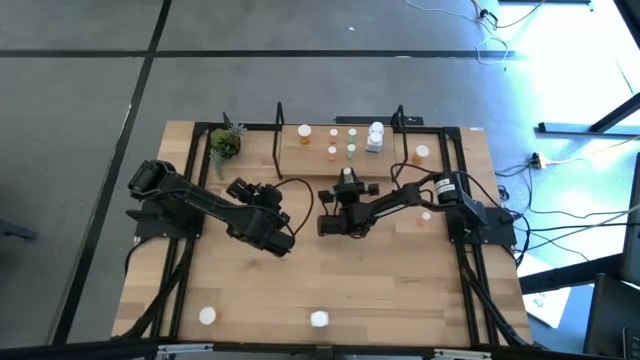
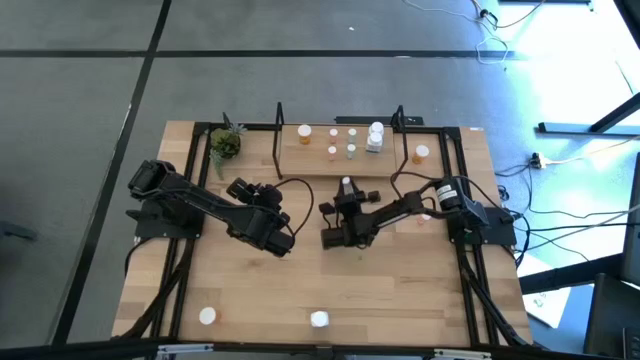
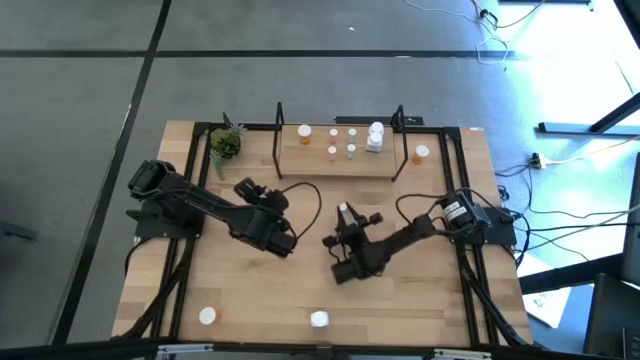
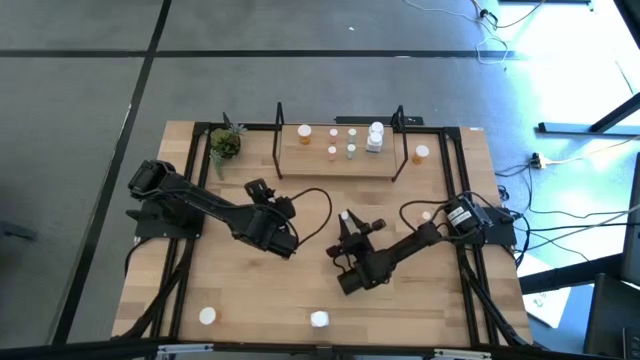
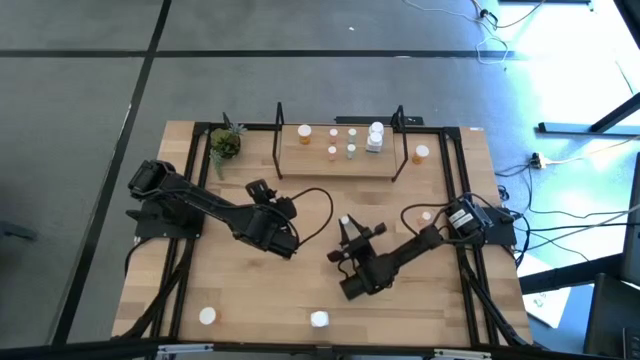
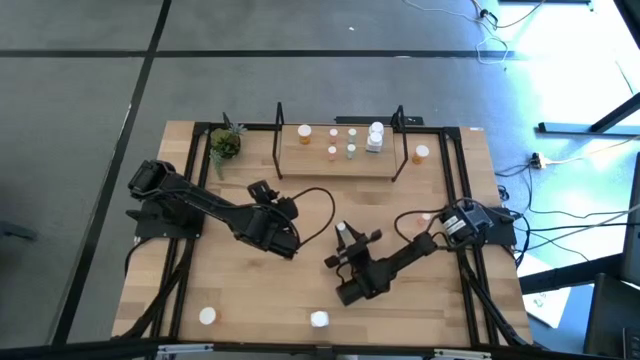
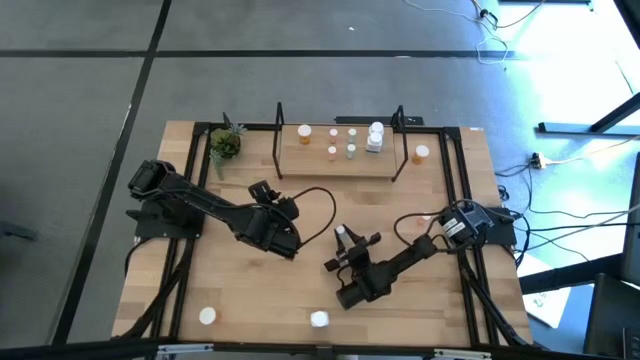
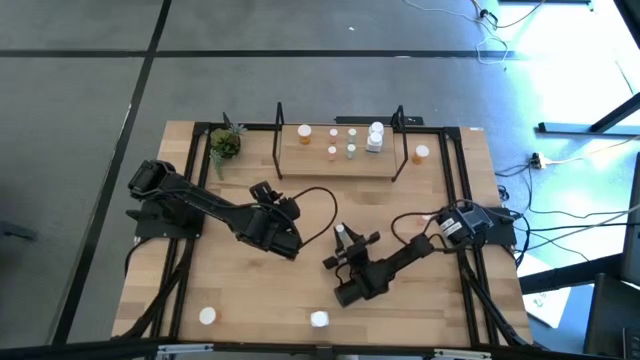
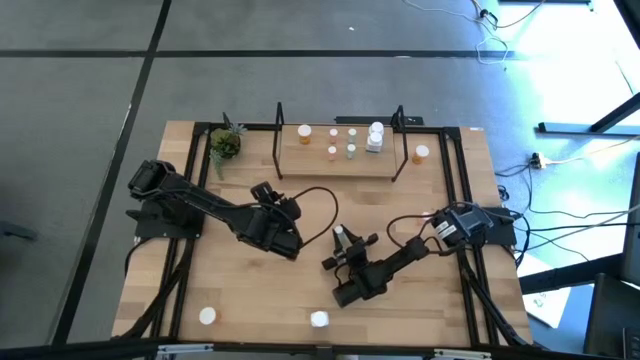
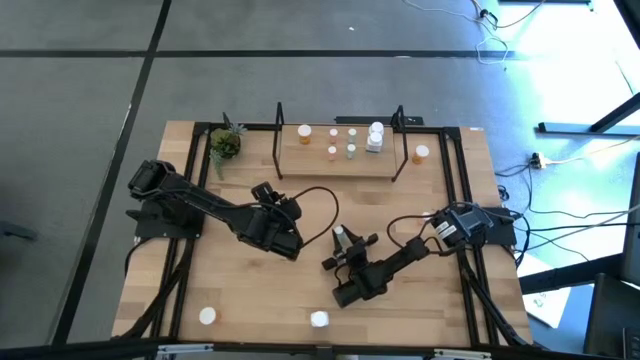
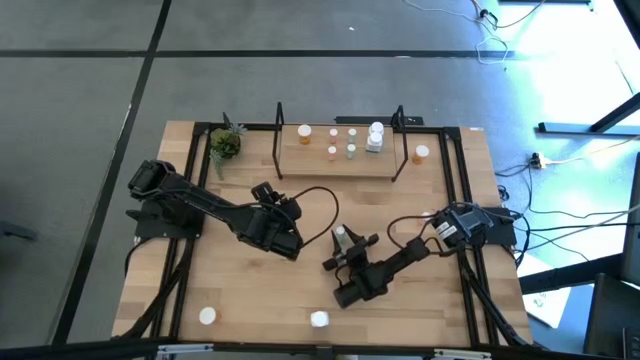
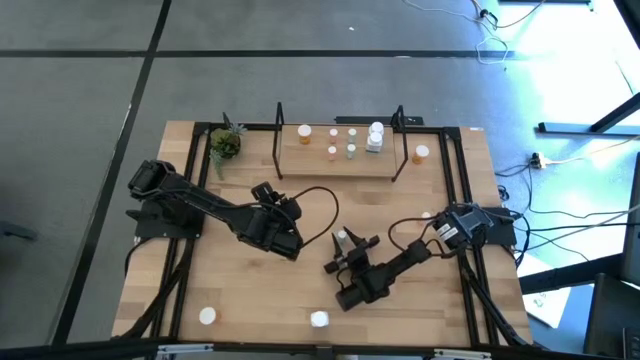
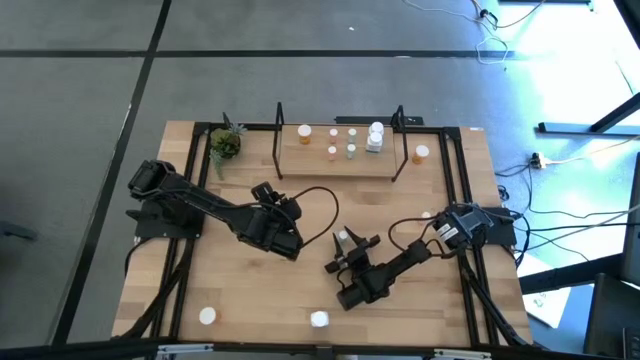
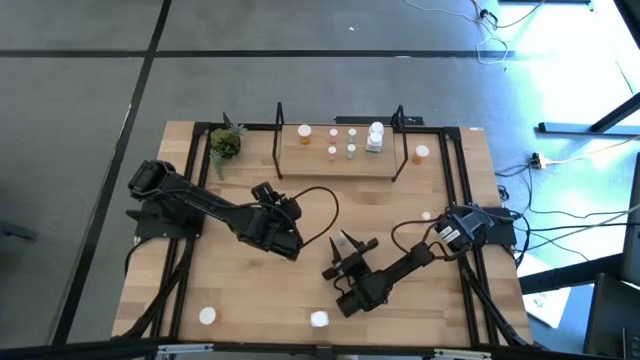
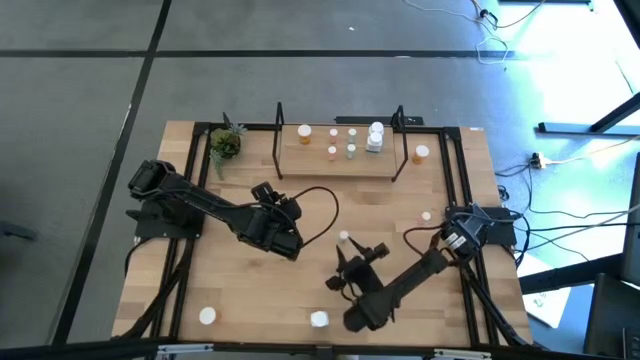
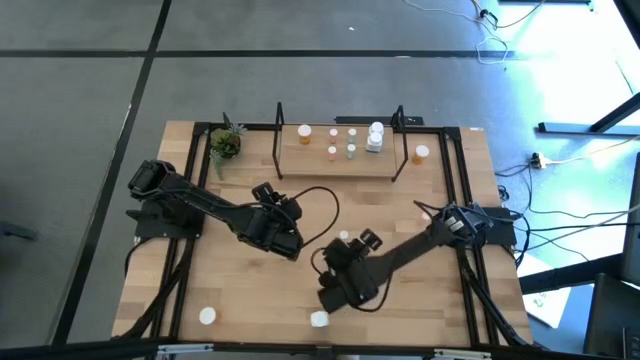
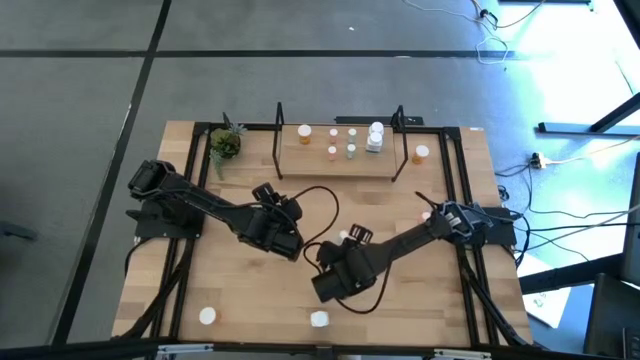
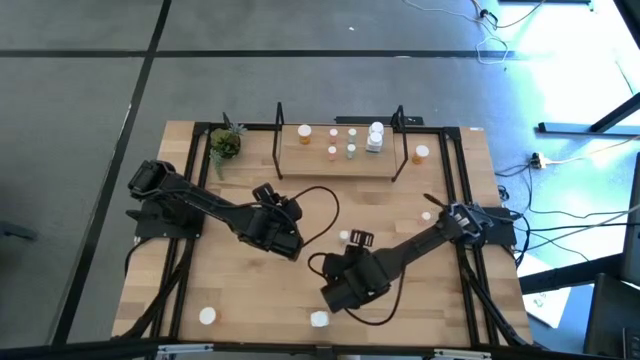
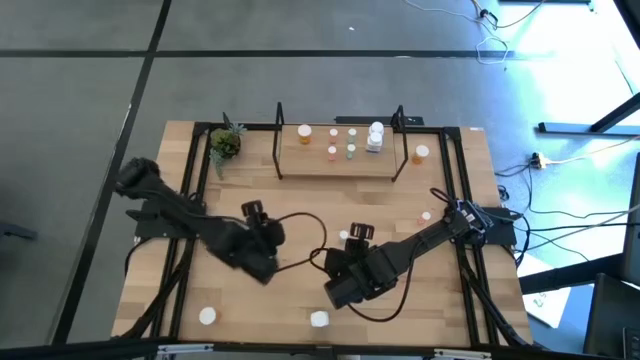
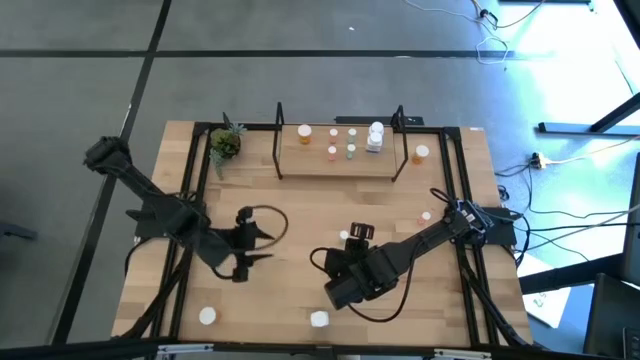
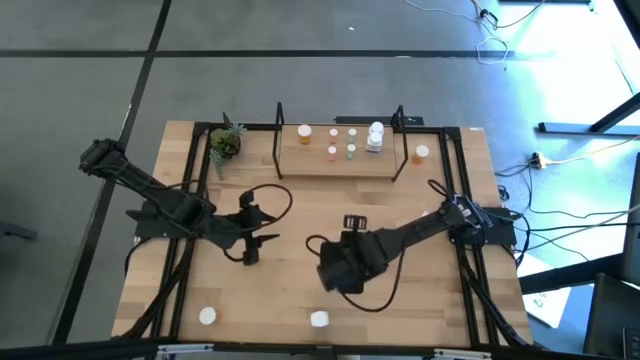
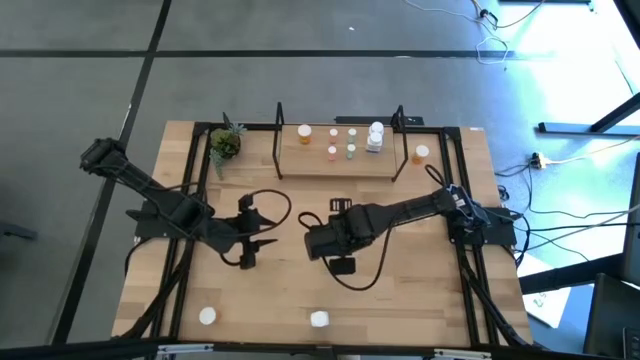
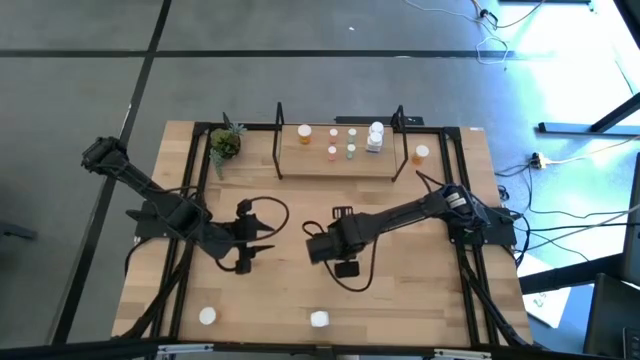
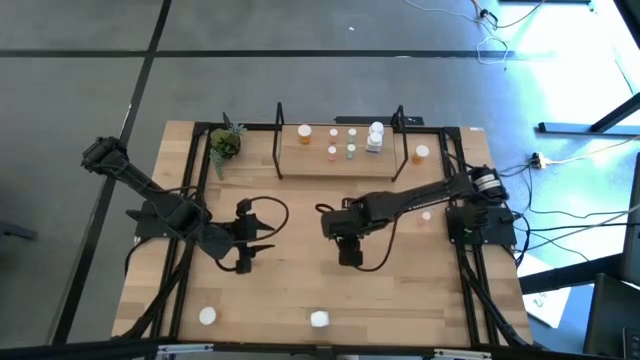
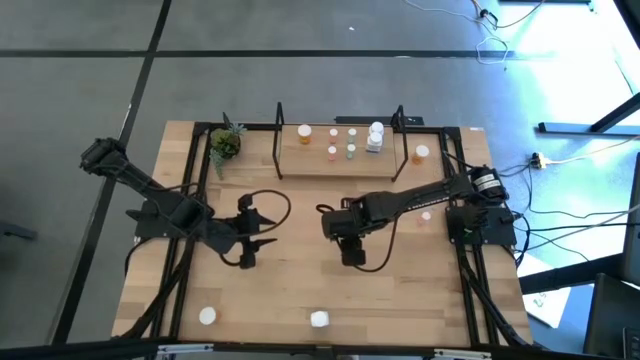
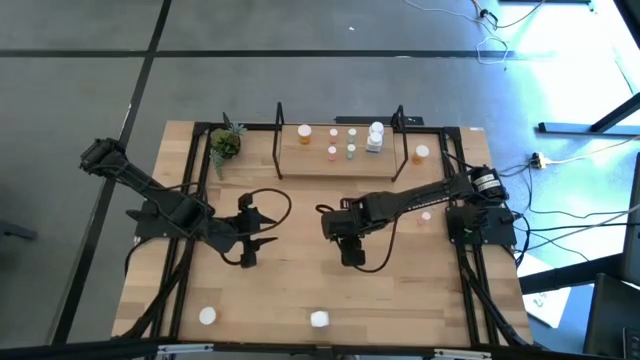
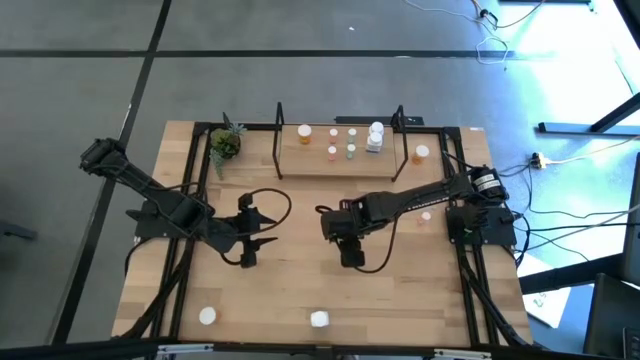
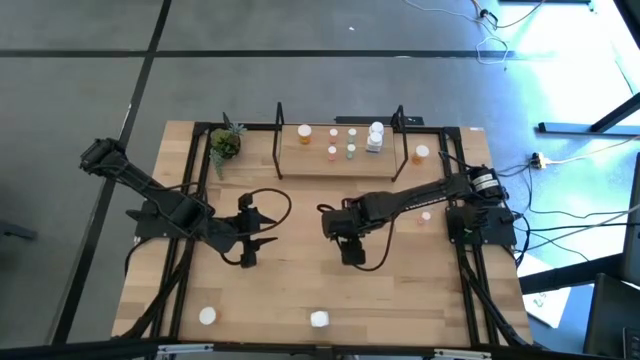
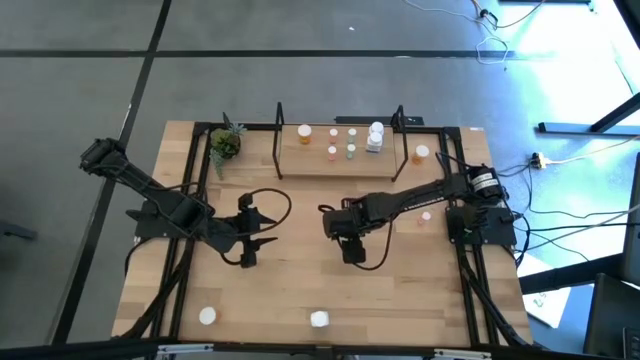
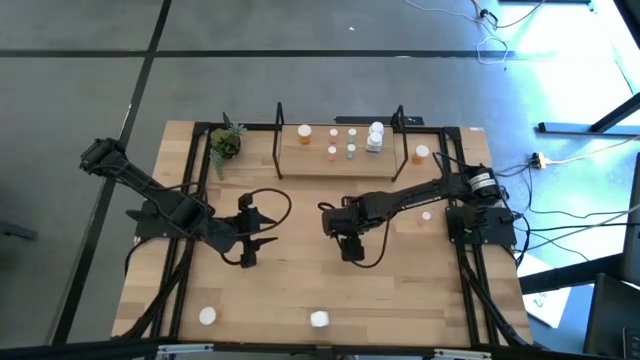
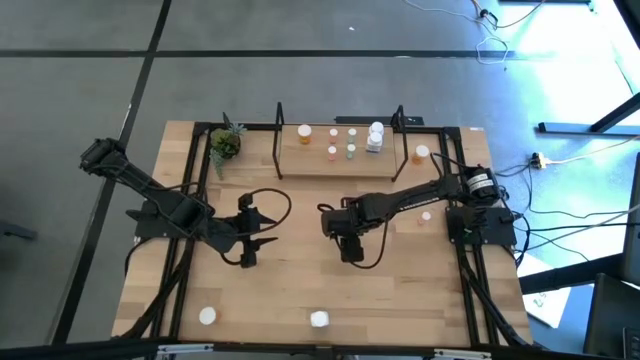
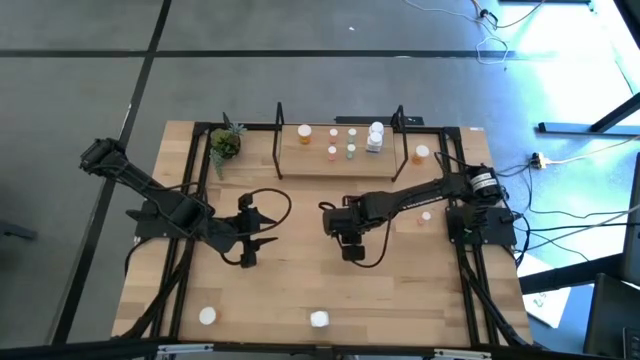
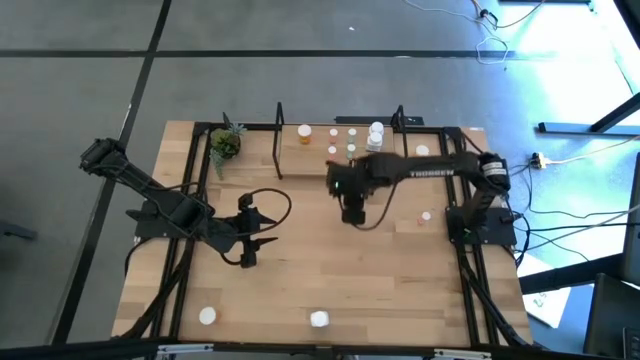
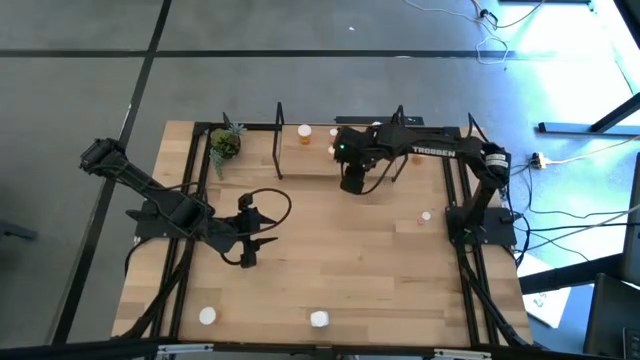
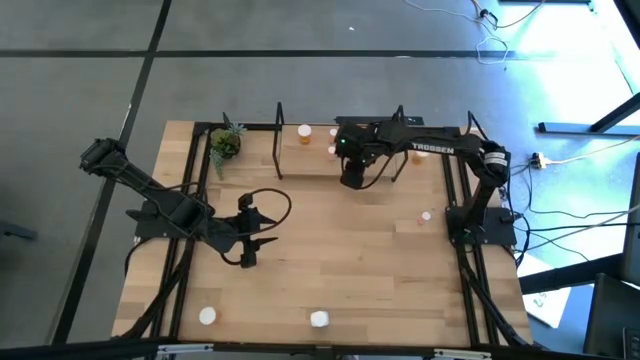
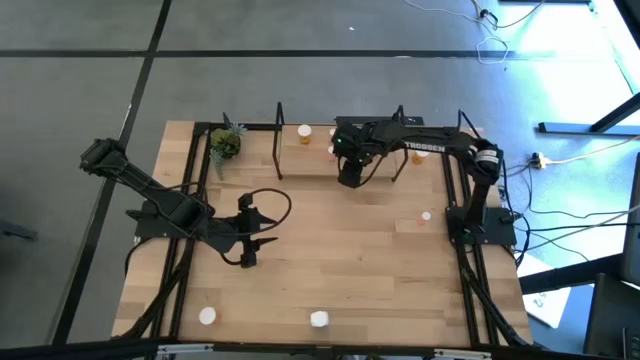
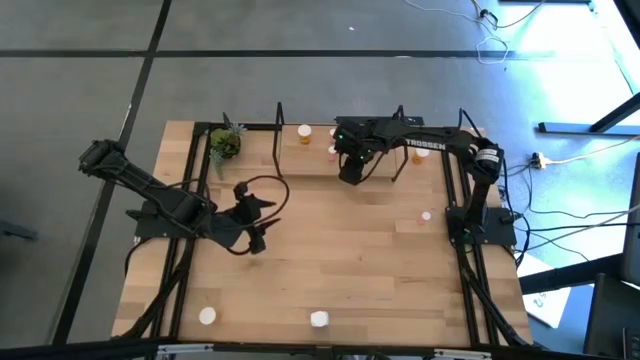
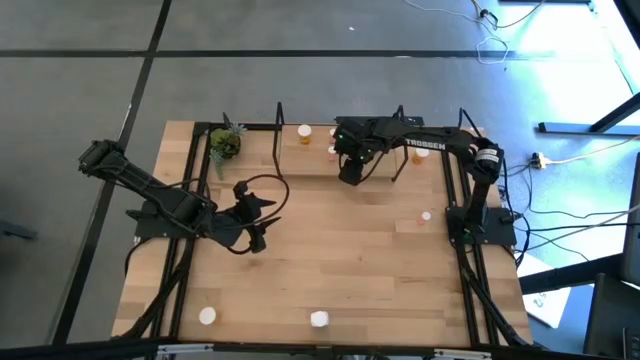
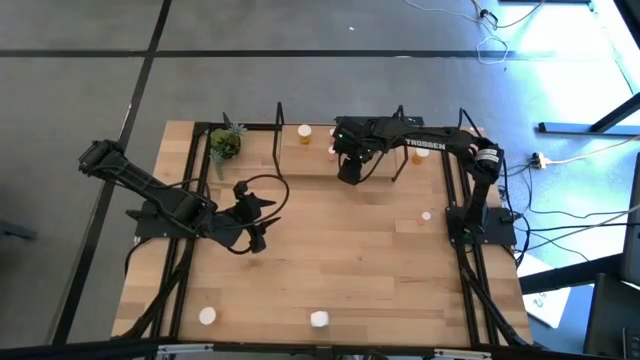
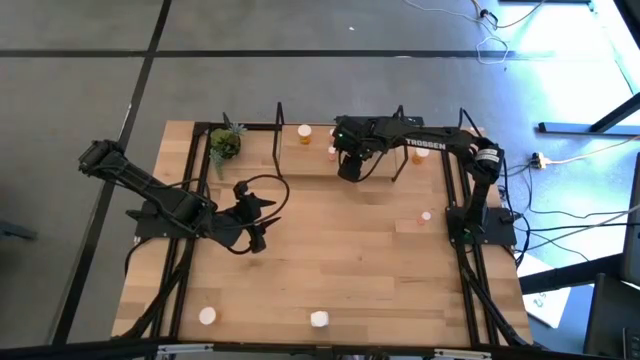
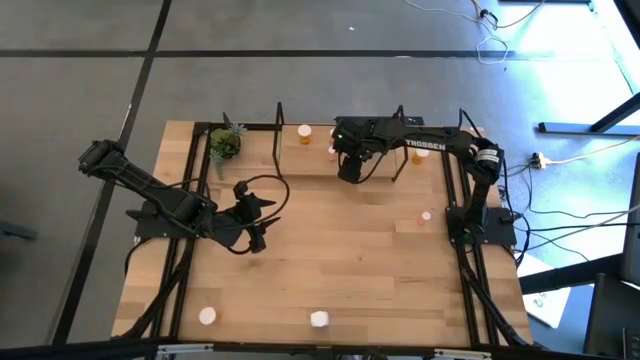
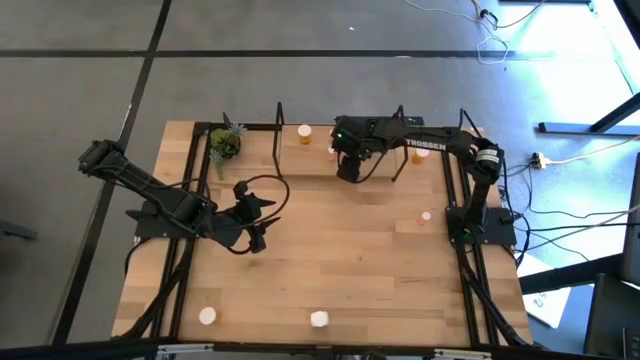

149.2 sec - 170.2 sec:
Task: Pick and place medicine bottles onto shelf by color
Put the green pill bottle on the shelf aligned with the green bottles
